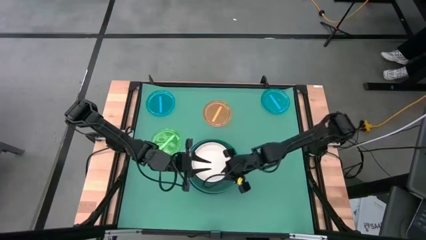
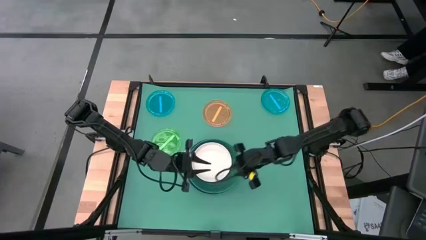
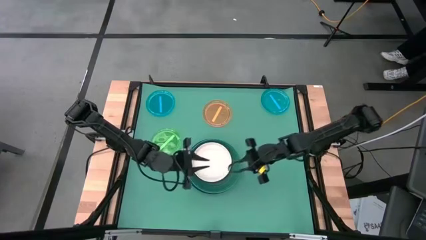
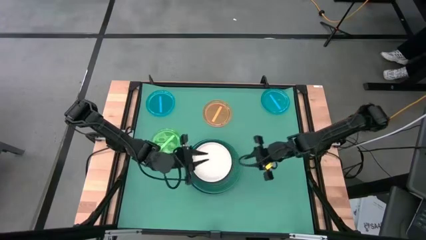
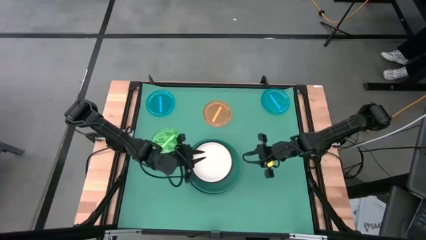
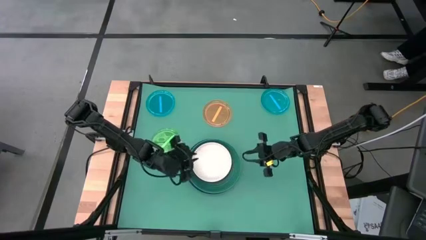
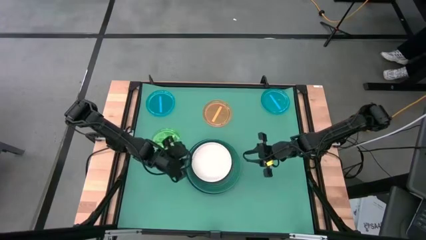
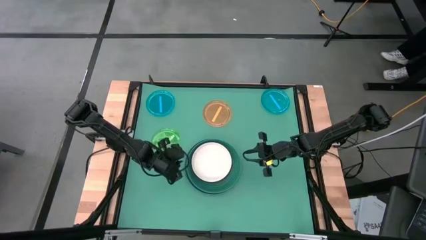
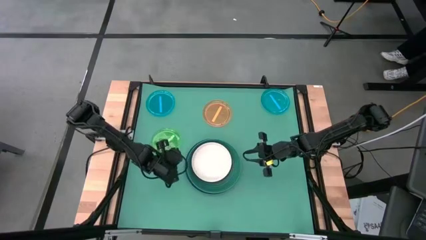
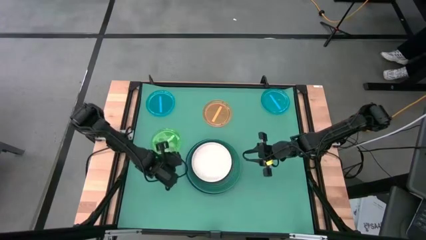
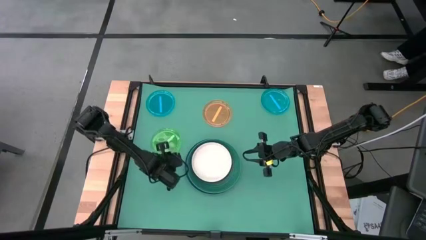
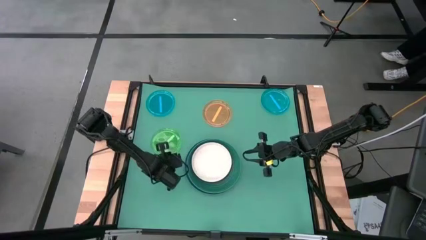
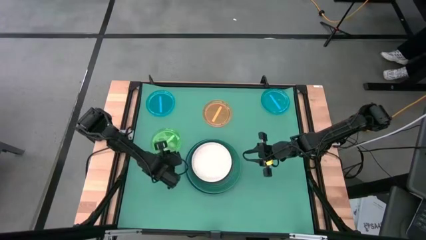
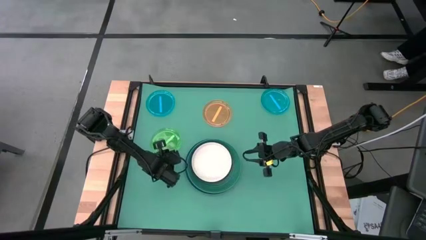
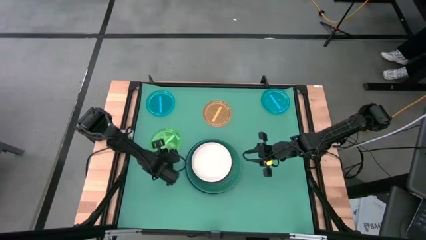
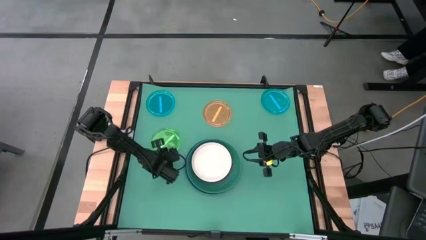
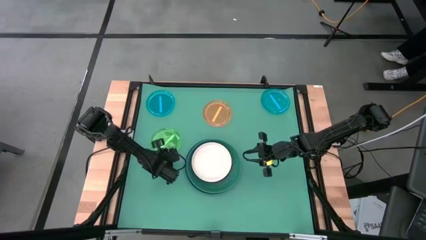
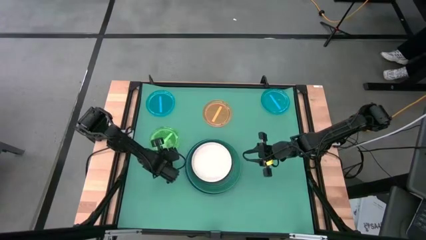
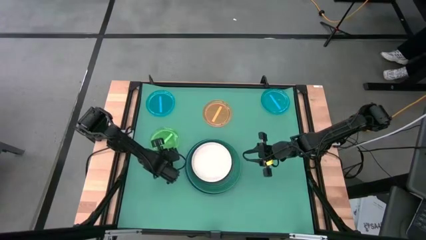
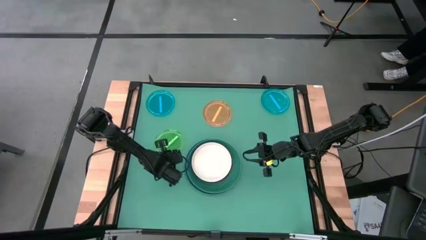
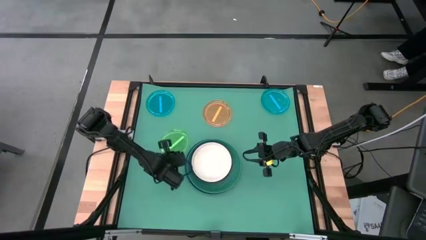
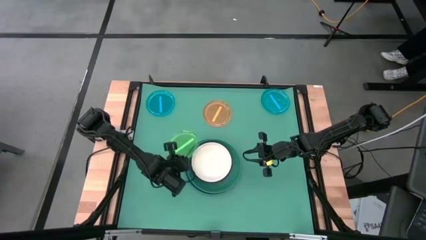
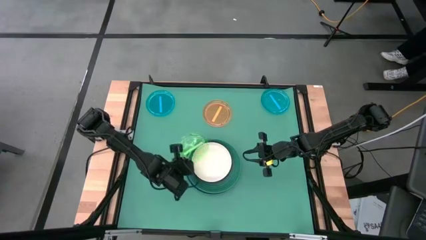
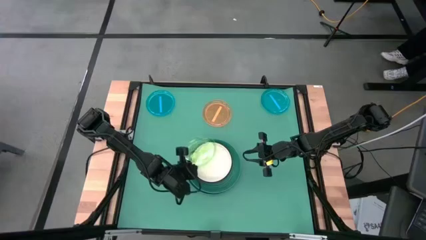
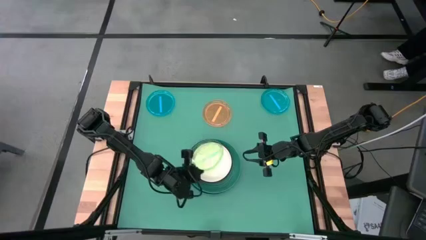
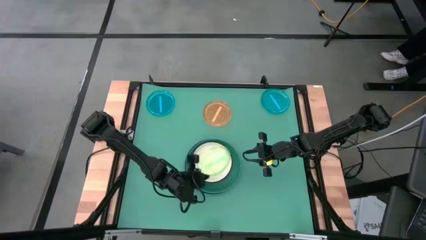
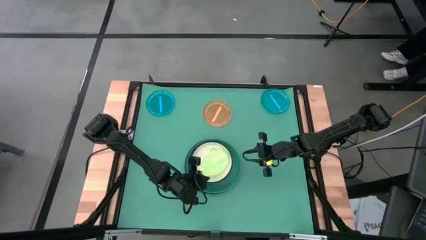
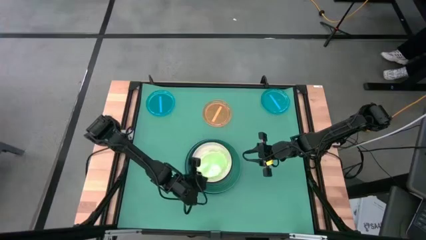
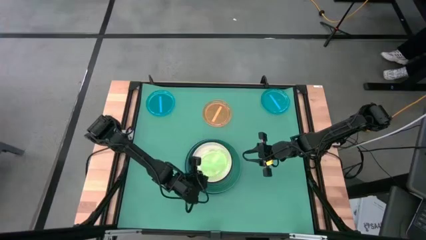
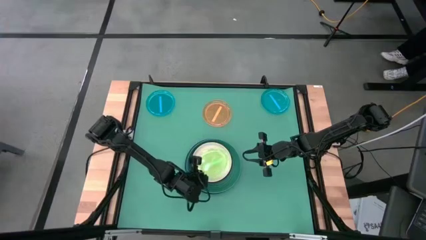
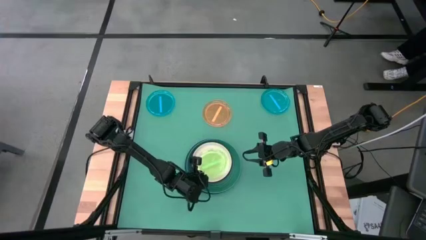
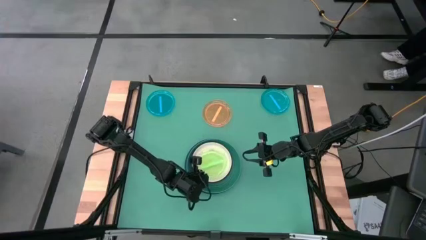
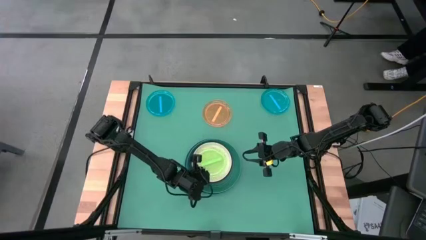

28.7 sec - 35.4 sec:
Task: Stack plastic plates
Stack the light green plate on top of the white plate

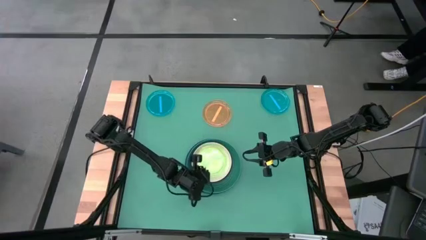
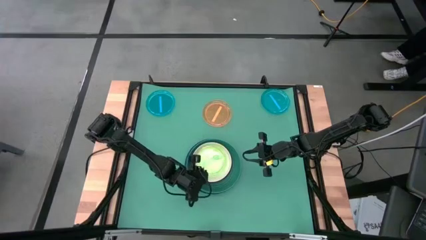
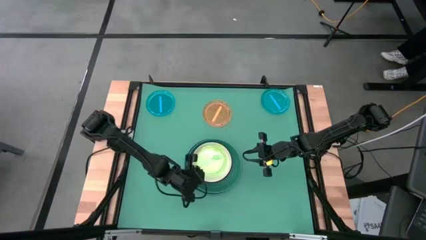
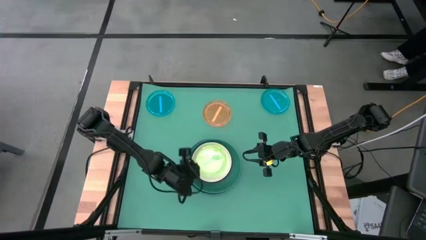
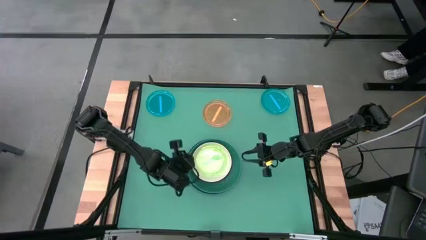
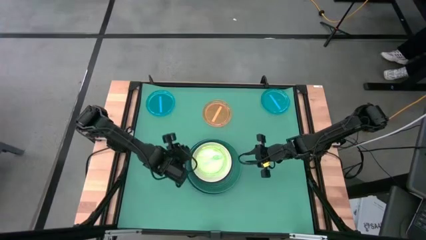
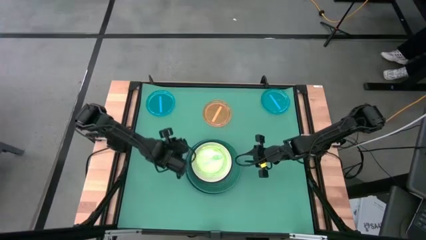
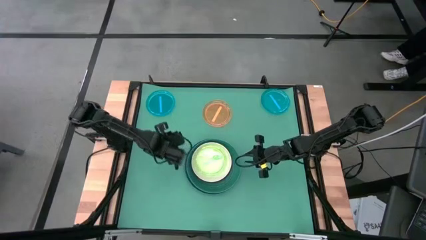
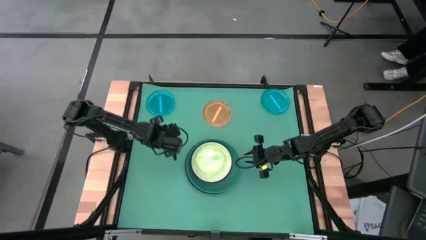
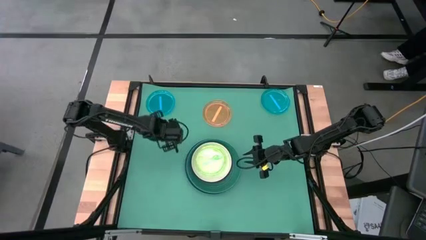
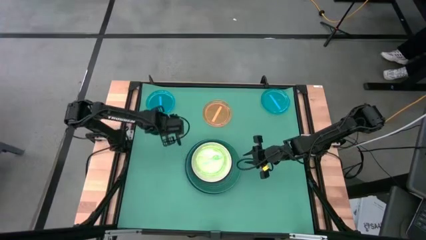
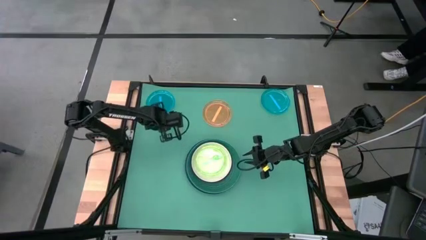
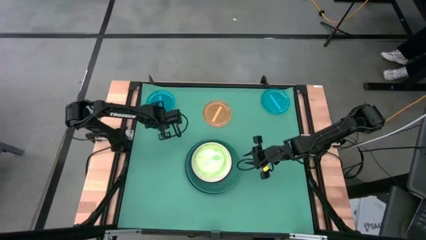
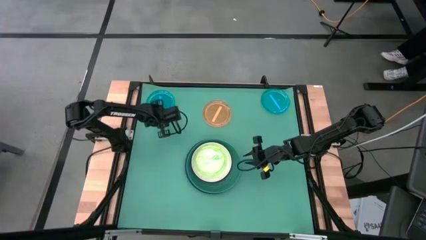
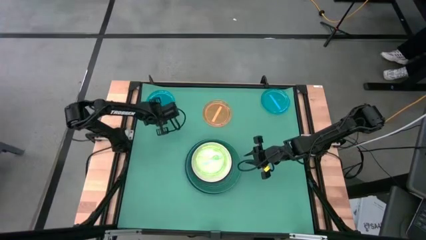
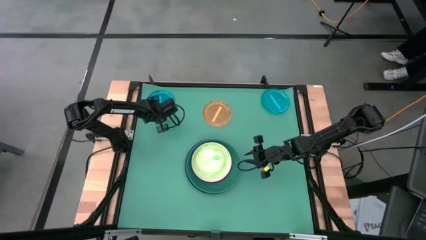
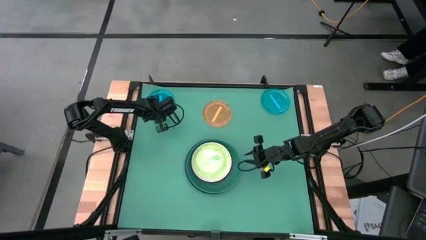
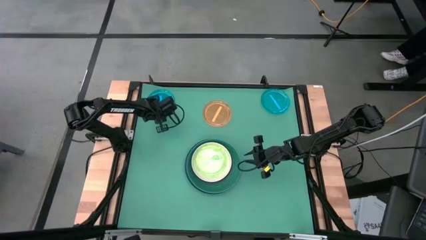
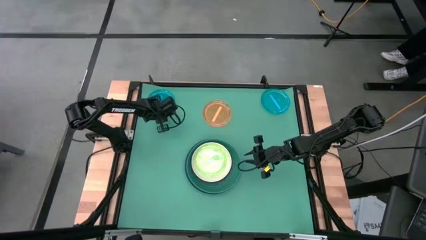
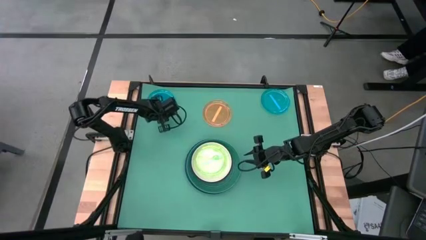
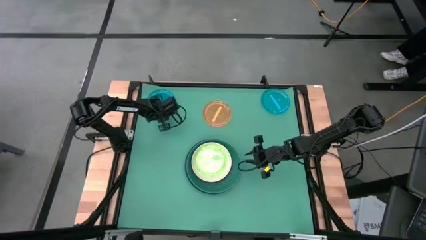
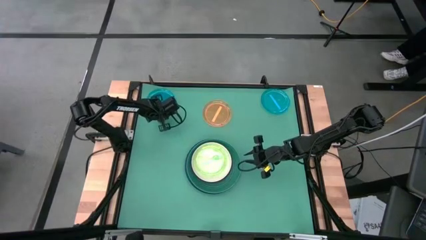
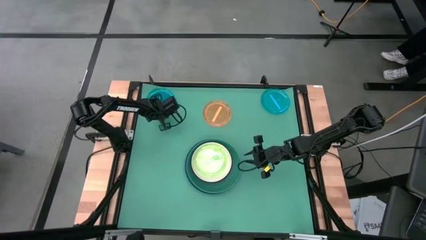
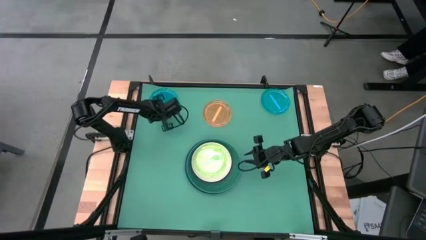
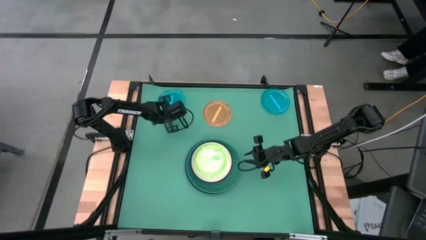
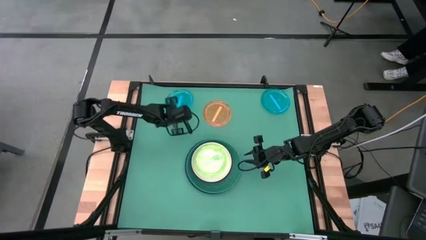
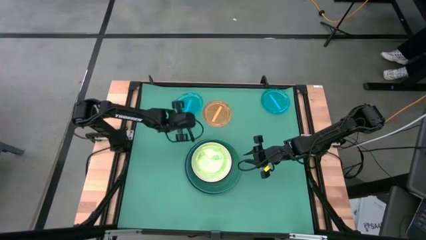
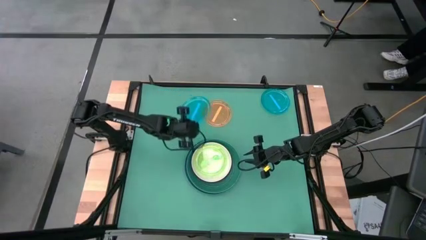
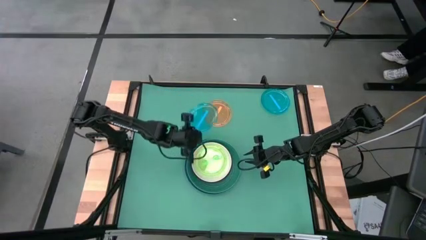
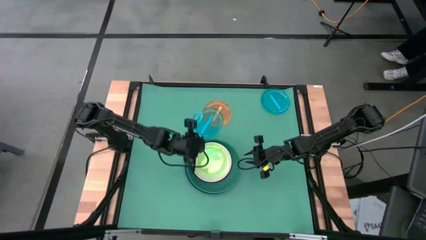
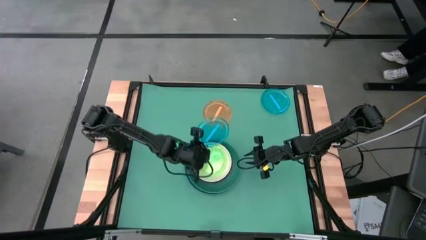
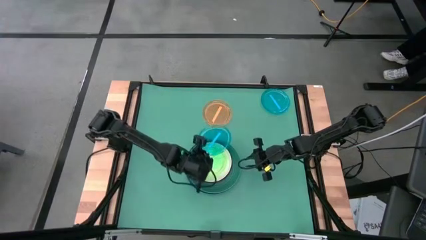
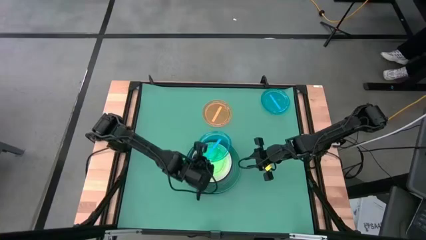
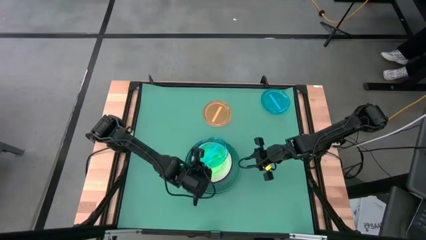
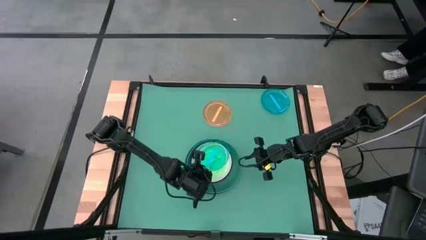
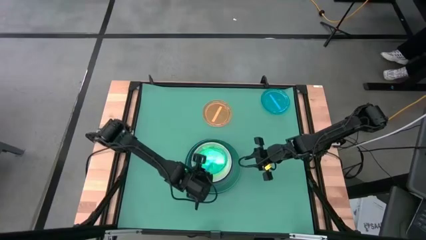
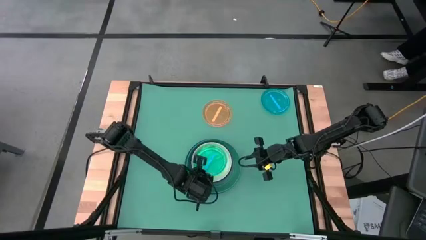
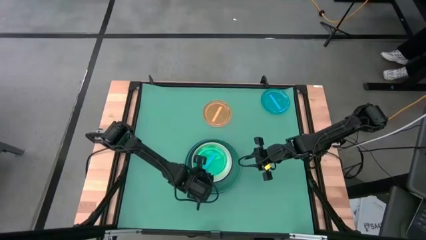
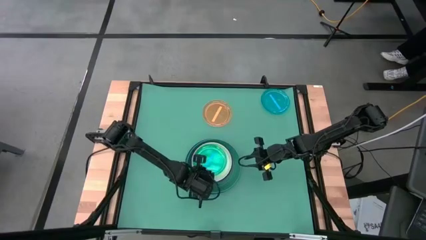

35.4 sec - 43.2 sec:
Stack the left light blue plate on top of the light green plate
